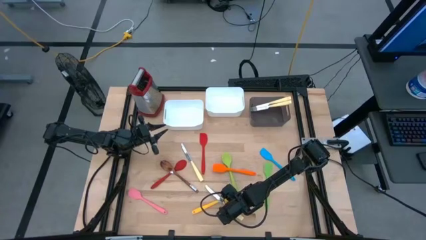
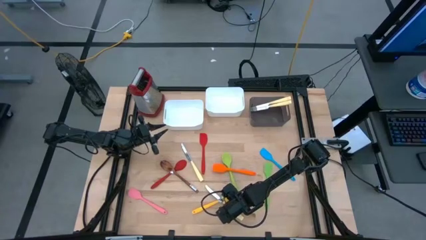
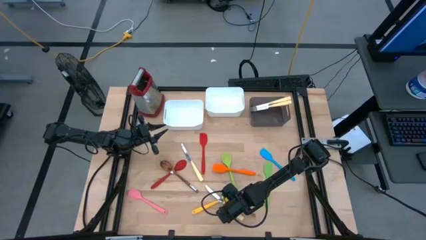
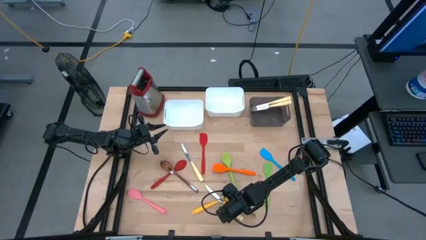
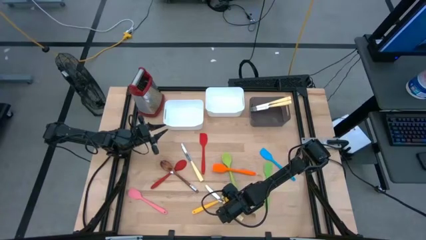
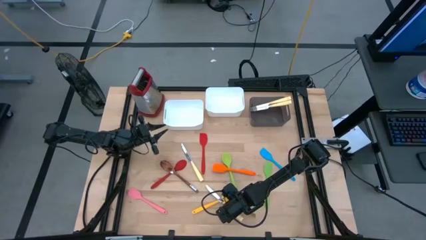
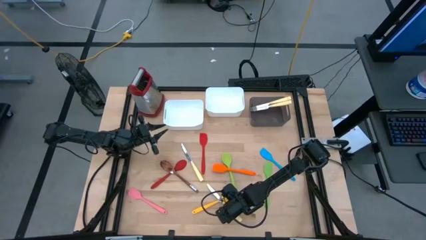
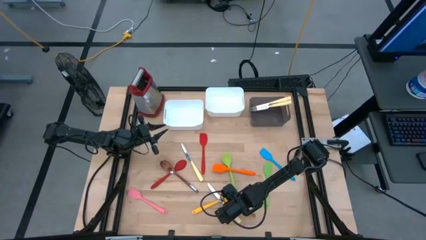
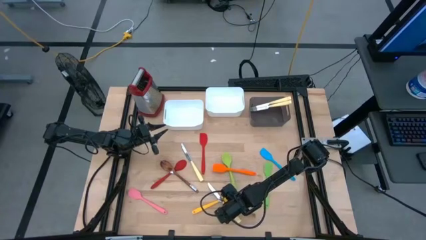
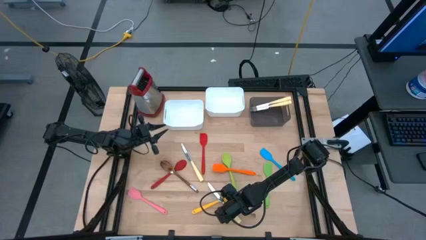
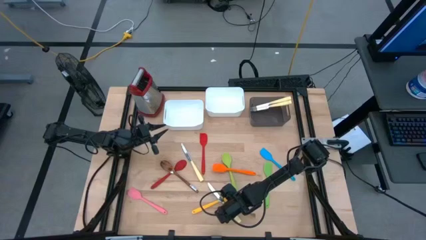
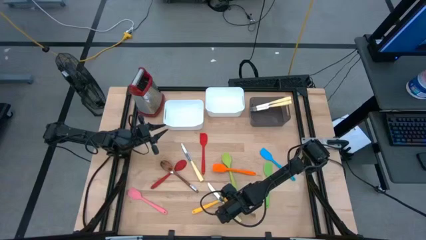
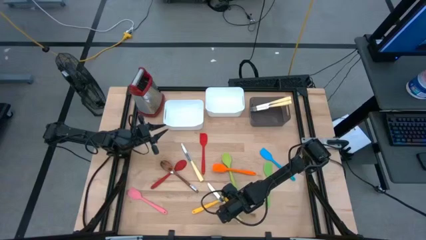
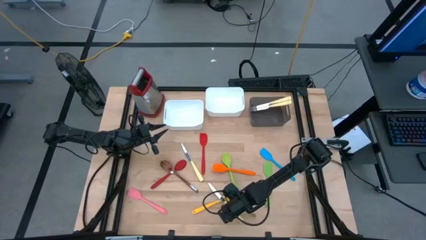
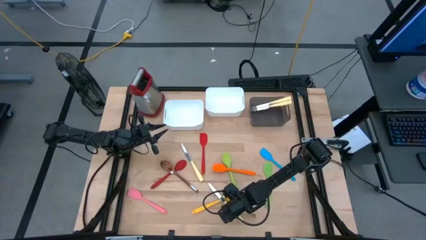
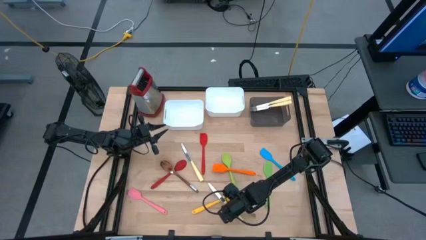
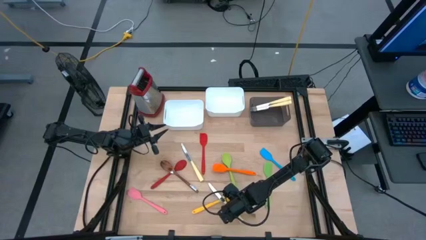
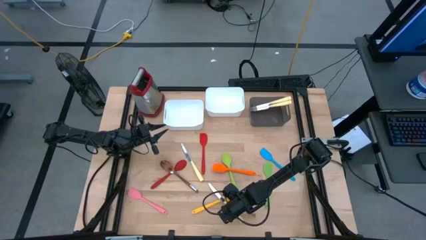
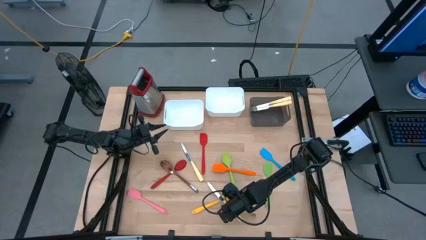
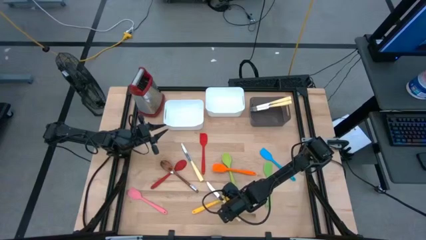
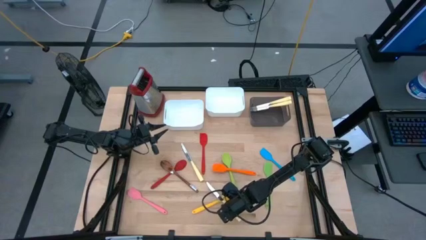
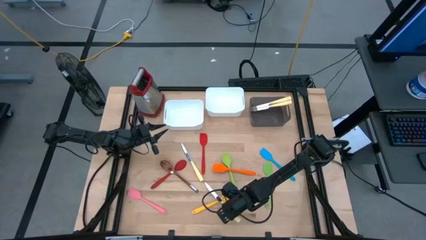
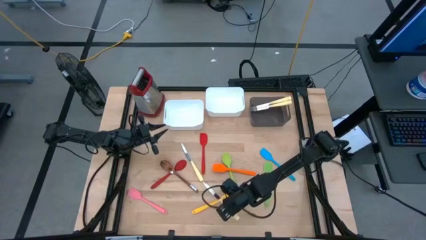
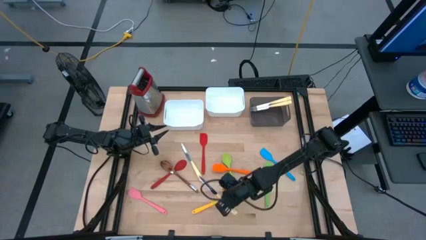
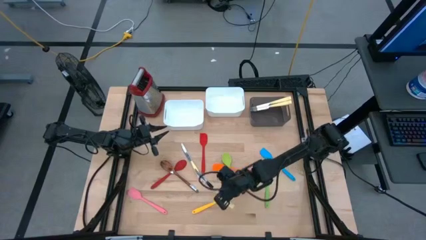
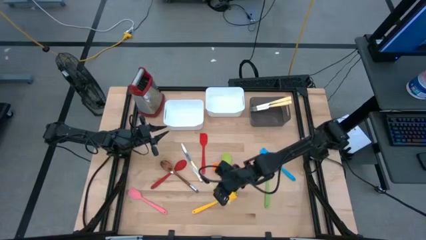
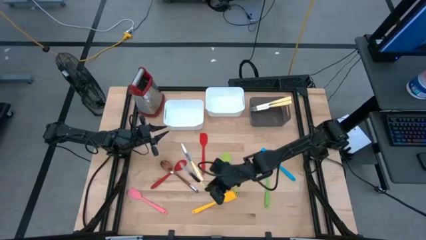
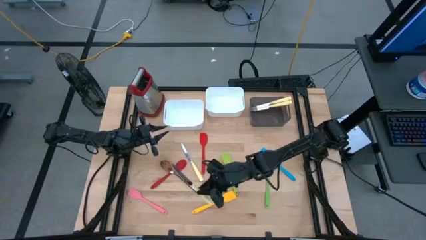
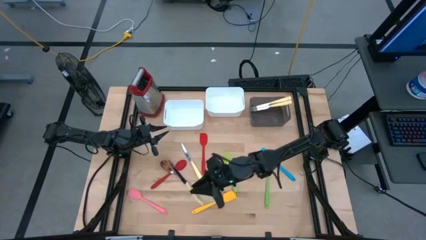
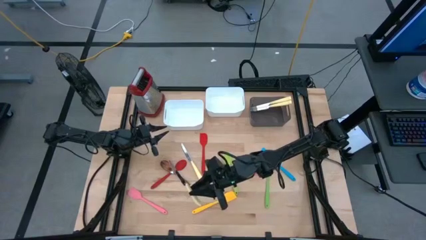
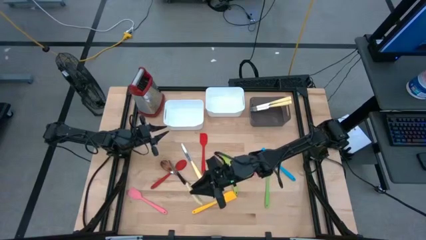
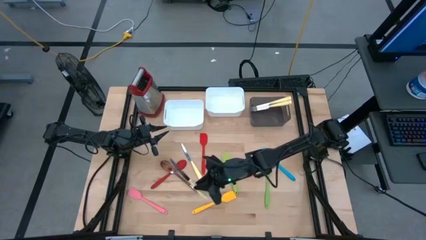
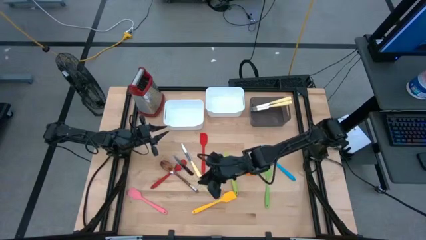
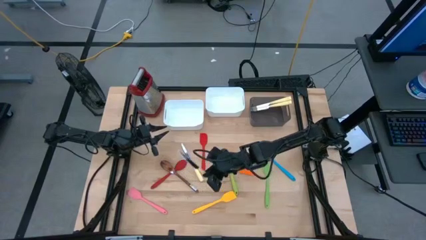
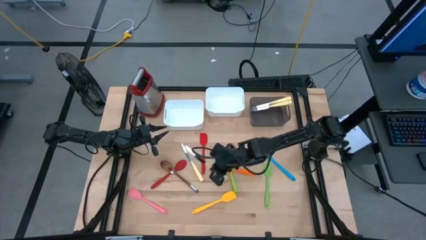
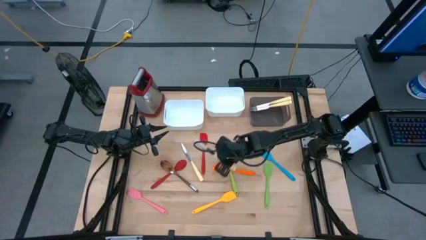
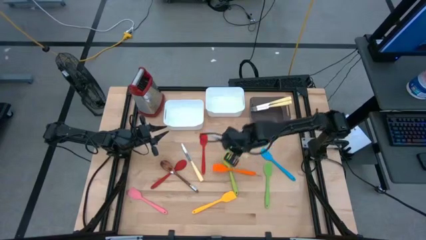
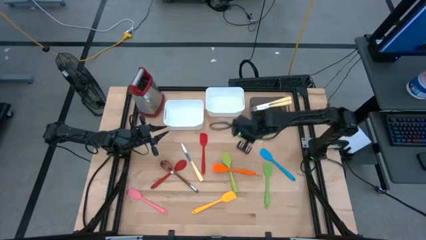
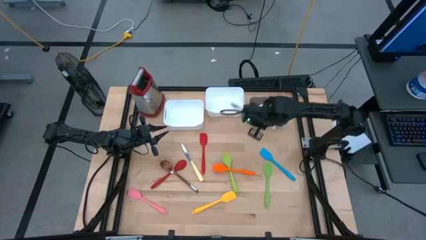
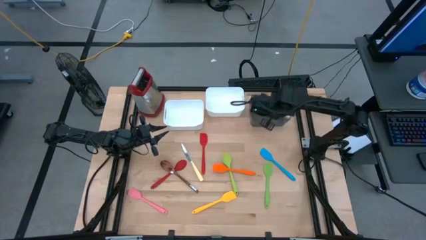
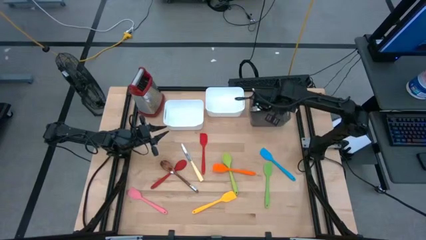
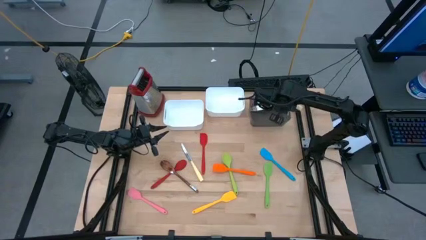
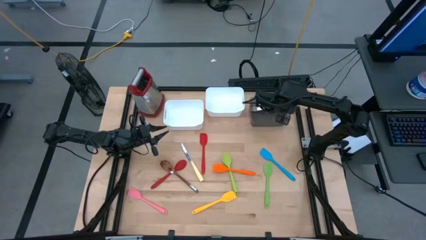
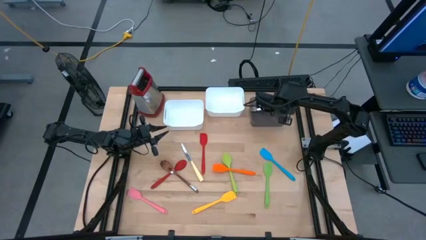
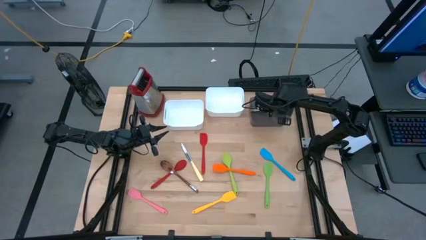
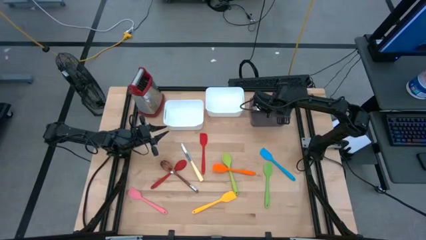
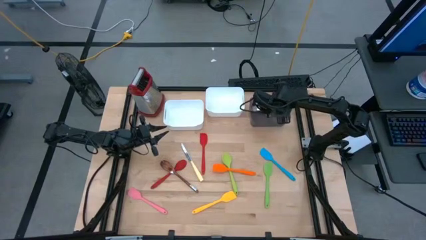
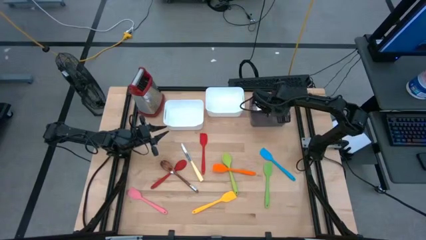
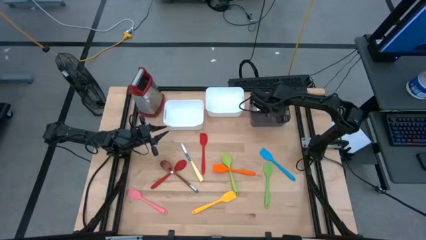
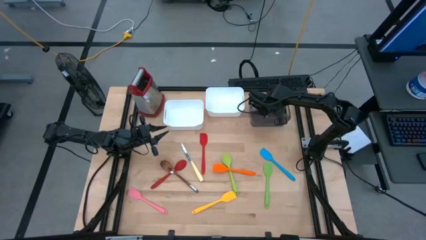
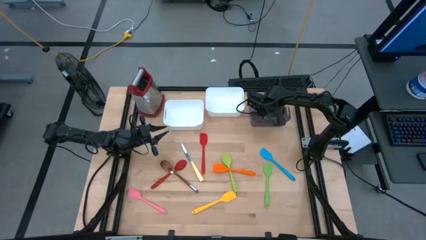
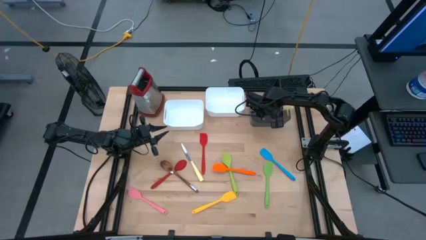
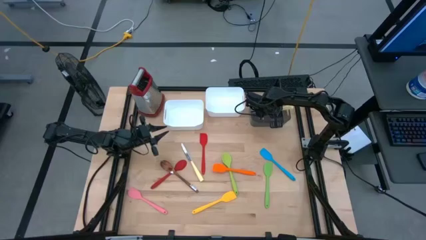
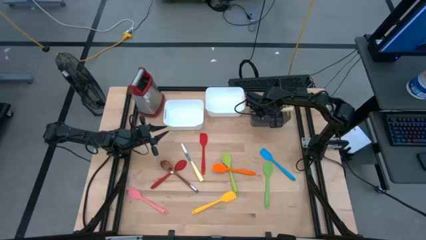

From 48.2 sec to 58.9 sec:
Task: Pick & Place Kitchen Items
Put the yellow knife into the black bin
